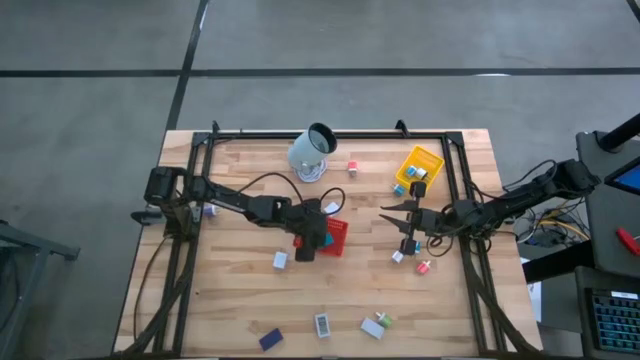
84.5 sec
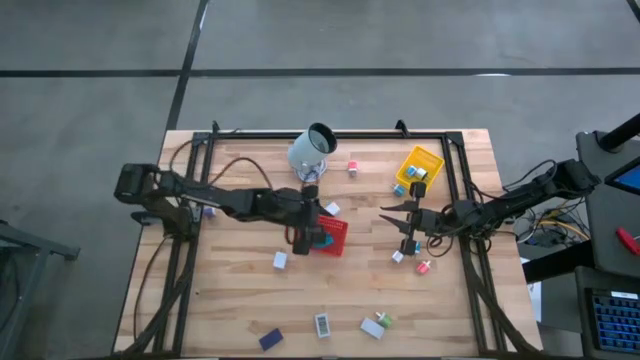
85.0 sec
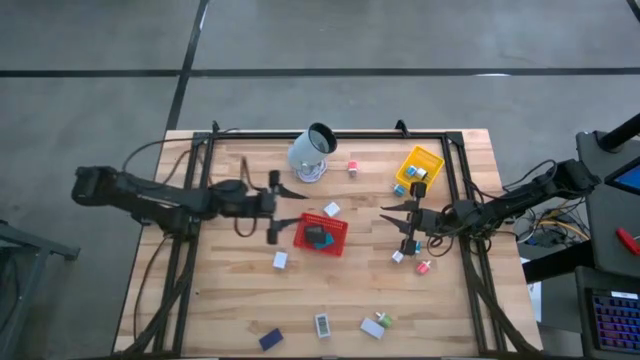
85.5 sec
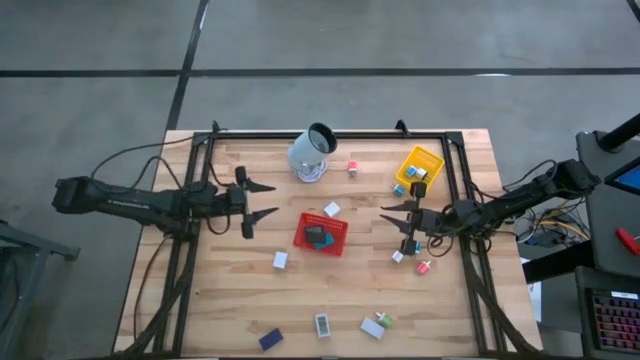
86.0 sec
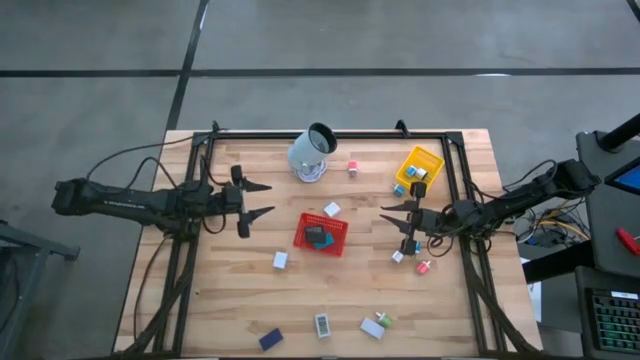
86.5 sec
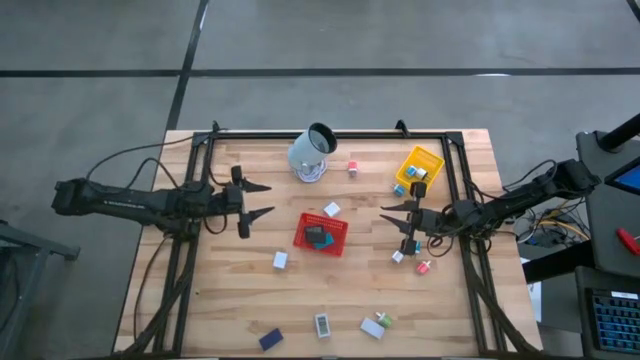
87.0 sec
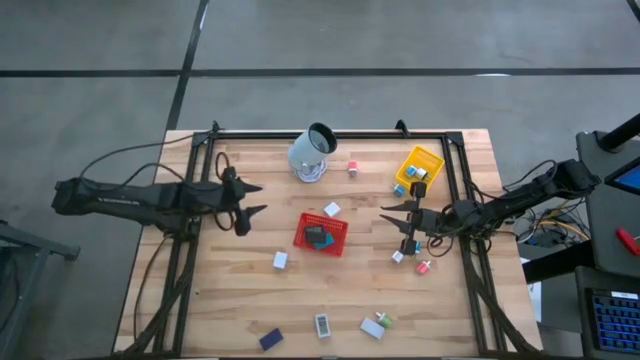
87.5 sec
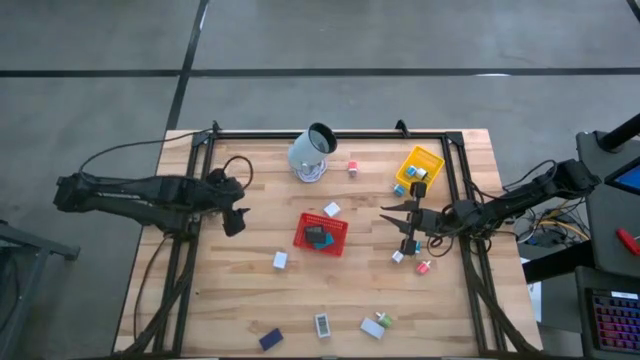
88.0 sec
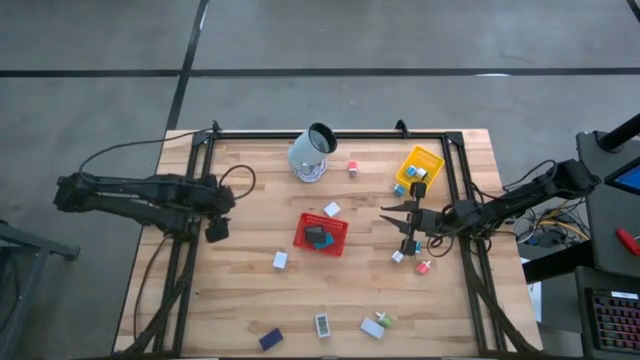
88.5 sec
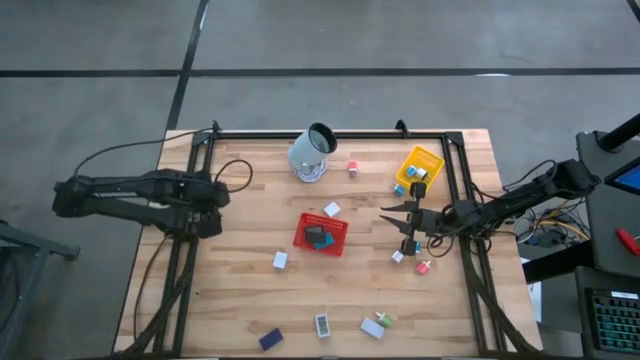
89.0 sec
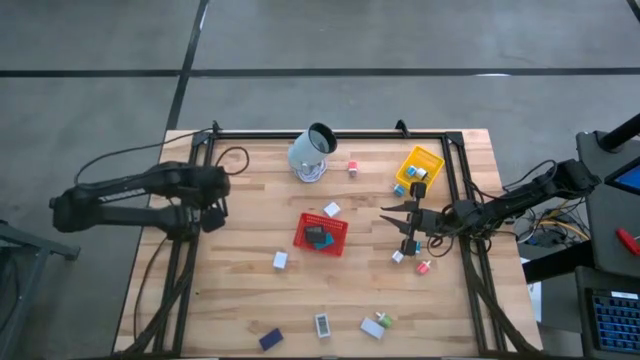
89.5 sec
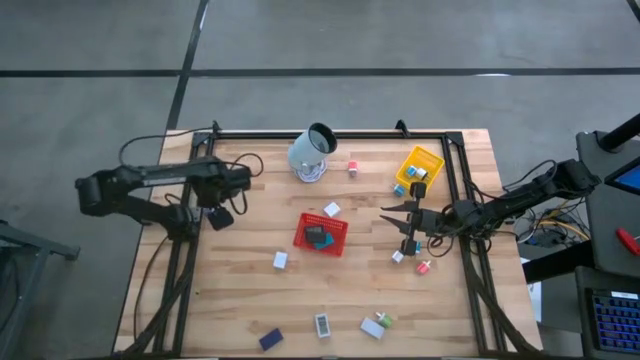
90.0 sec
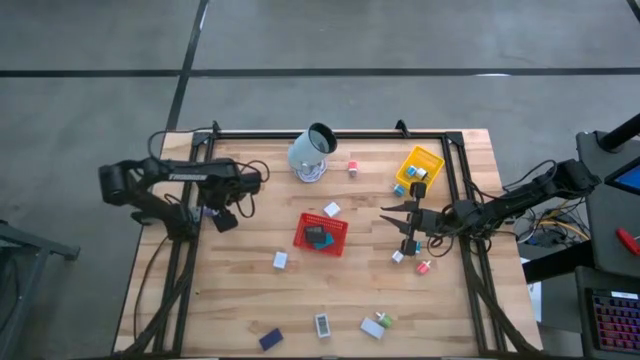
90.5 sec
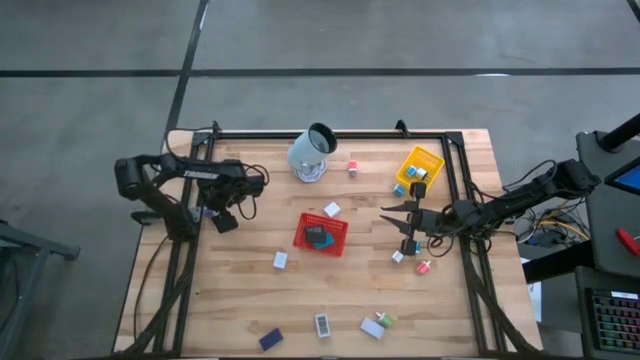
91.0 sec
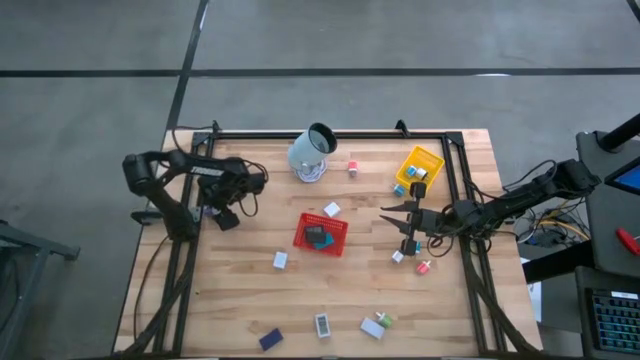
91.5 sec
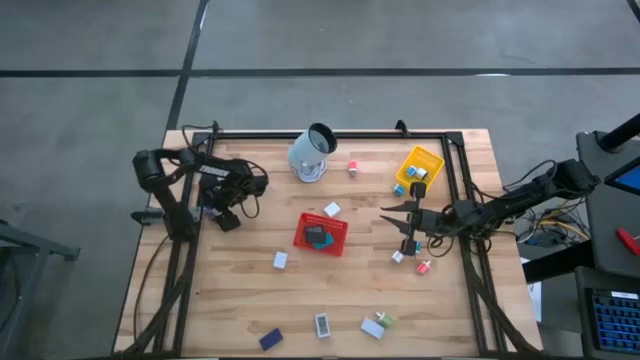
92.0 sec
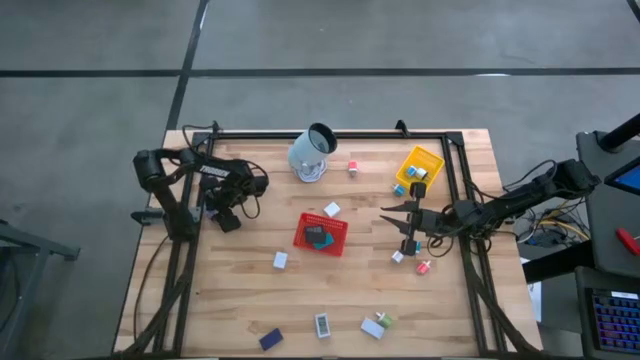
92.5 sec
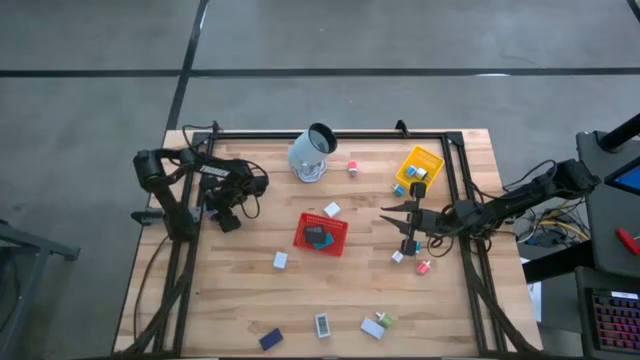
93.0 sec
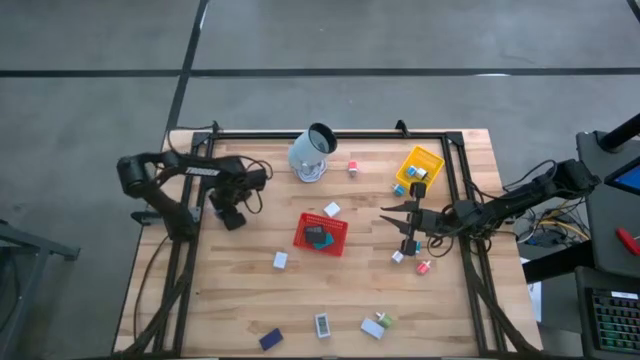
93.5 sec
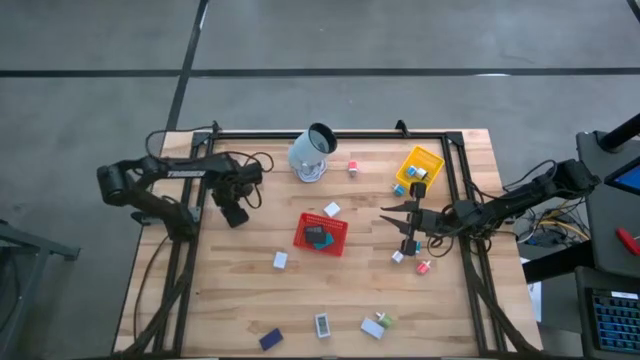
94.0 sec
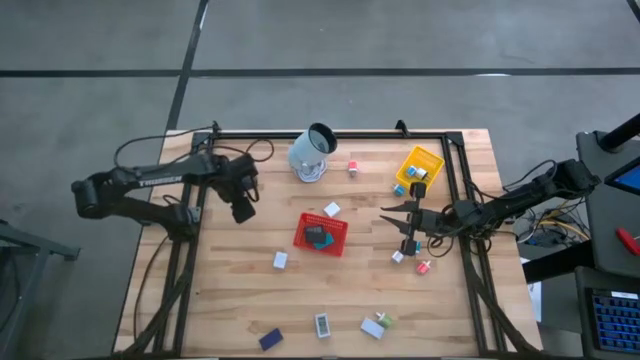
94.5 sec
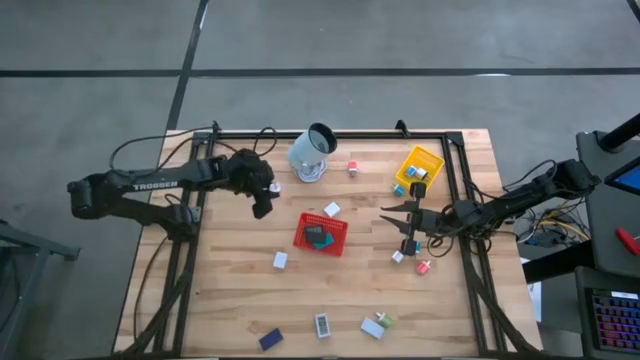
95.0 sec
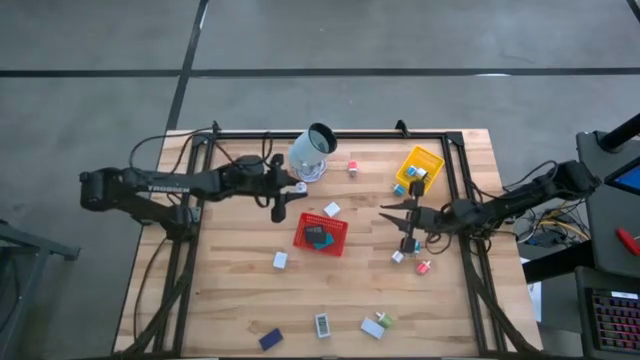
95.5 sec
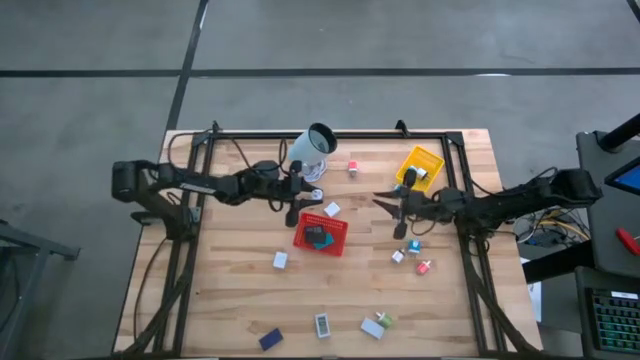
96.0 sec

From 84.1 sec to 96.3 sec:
Task: Pick & Place Office items
Put the violet charger adapter into the yellow basket

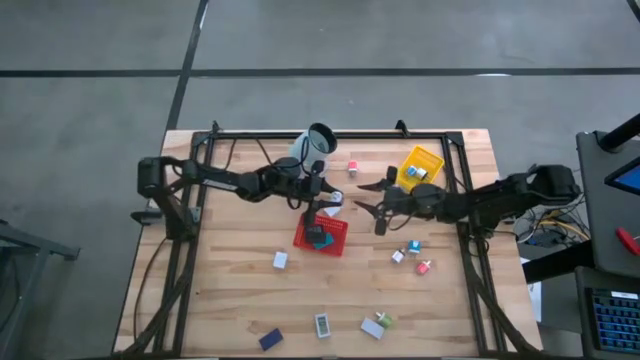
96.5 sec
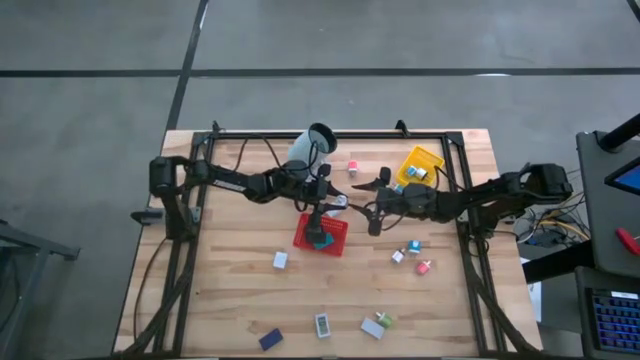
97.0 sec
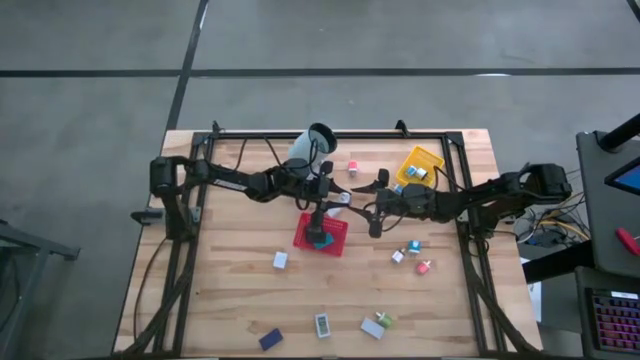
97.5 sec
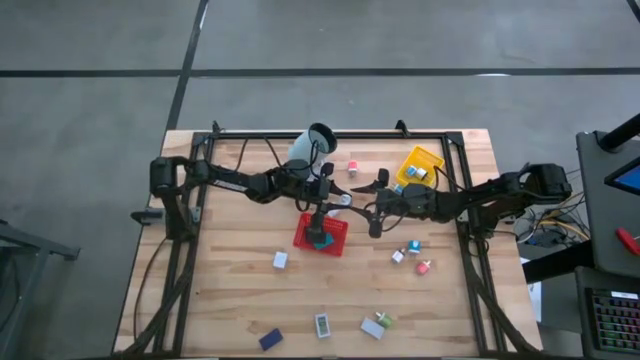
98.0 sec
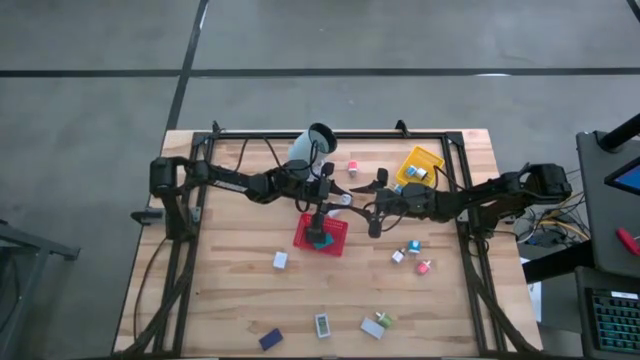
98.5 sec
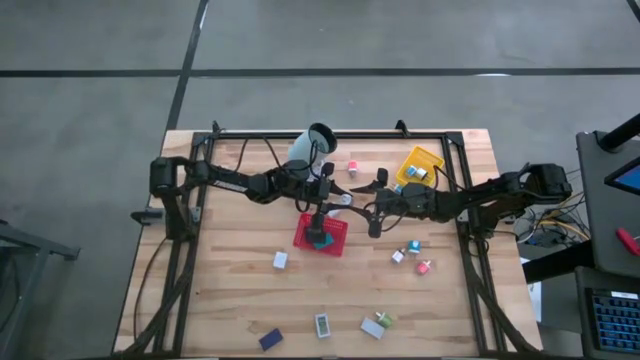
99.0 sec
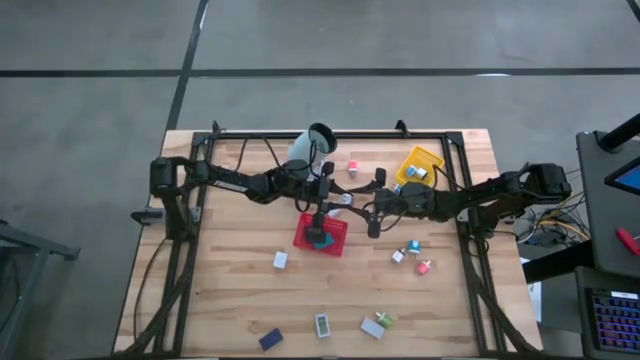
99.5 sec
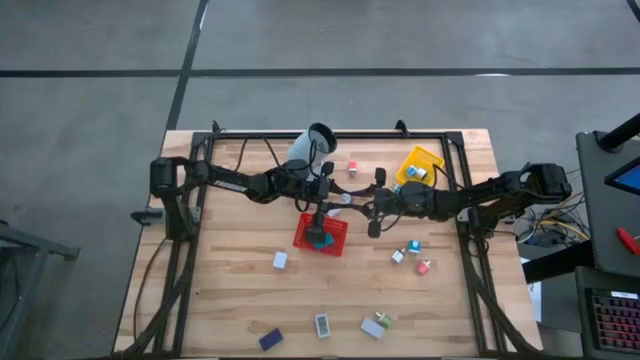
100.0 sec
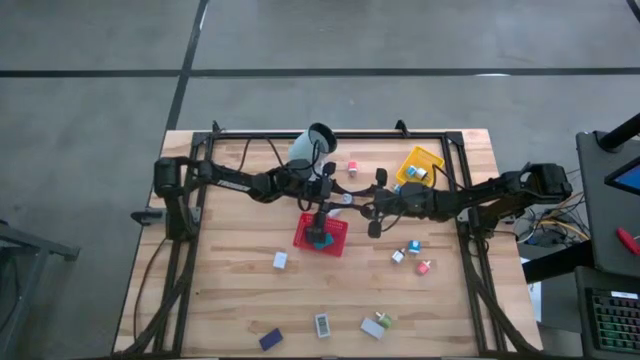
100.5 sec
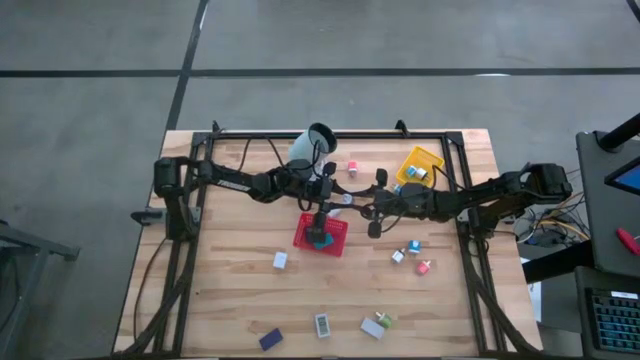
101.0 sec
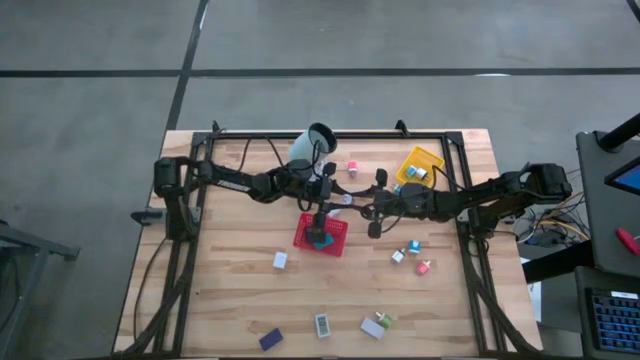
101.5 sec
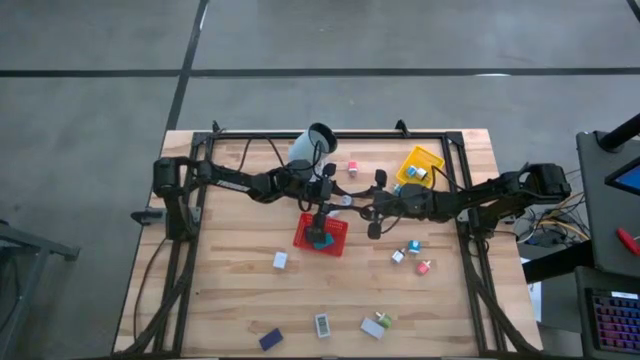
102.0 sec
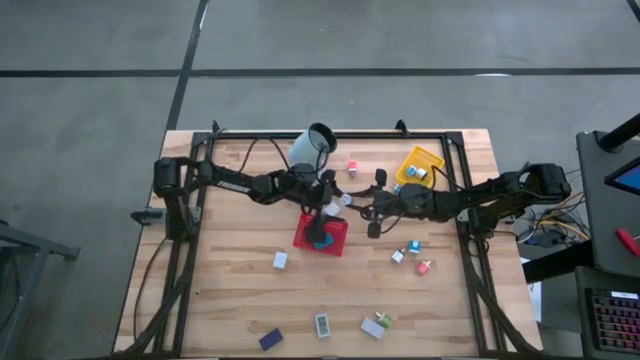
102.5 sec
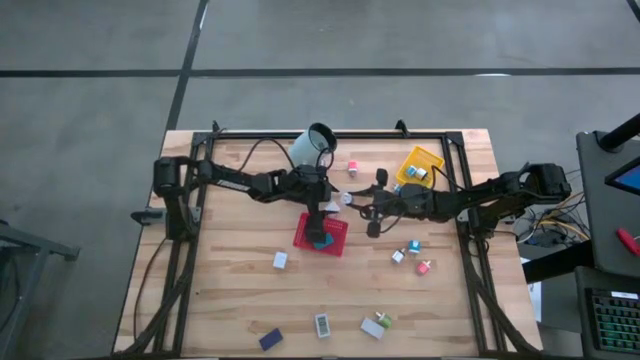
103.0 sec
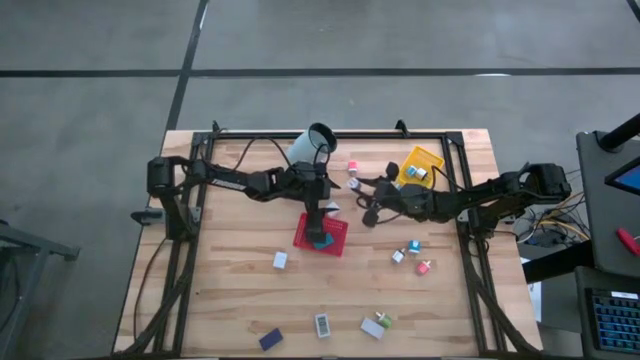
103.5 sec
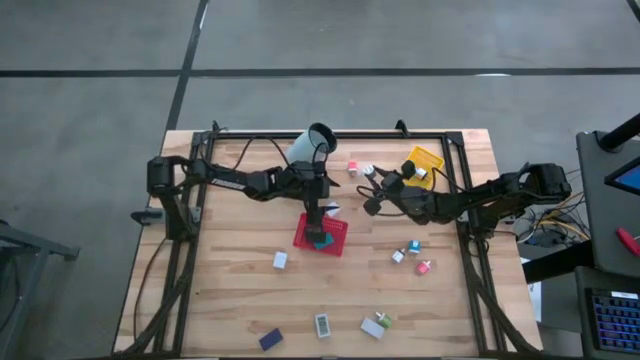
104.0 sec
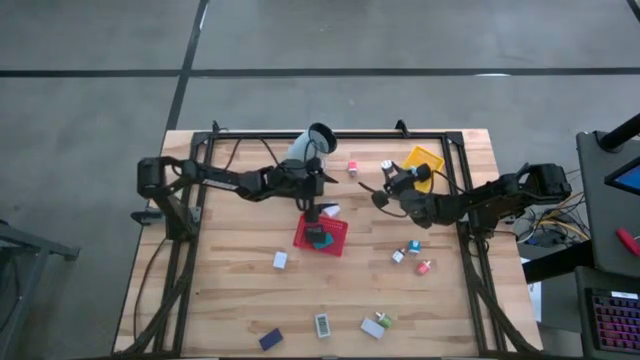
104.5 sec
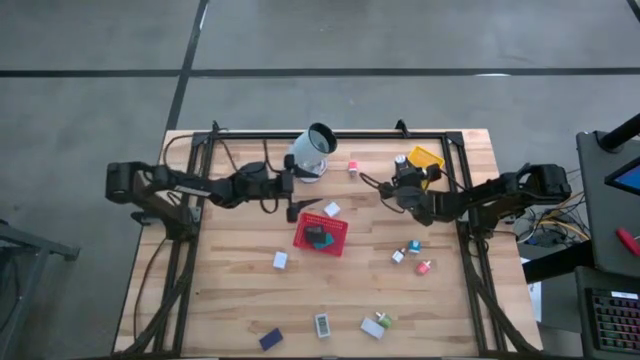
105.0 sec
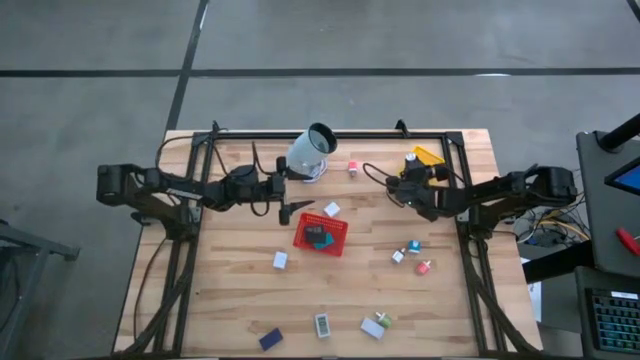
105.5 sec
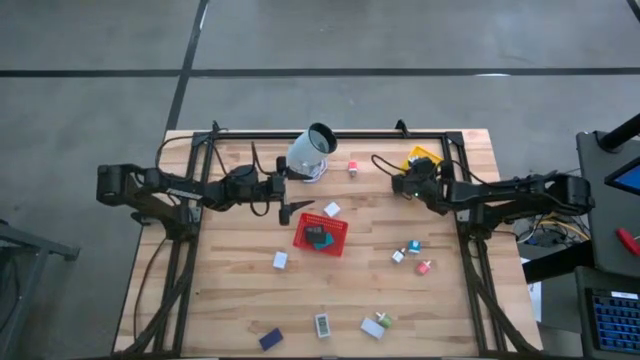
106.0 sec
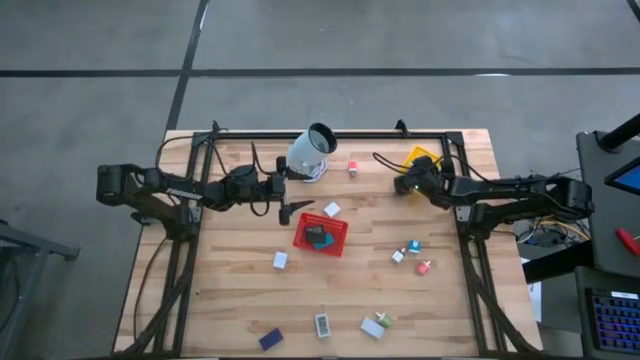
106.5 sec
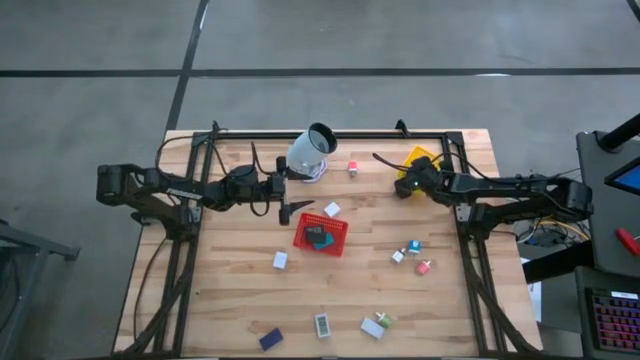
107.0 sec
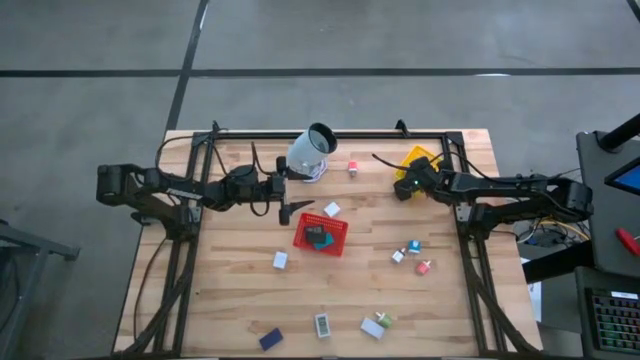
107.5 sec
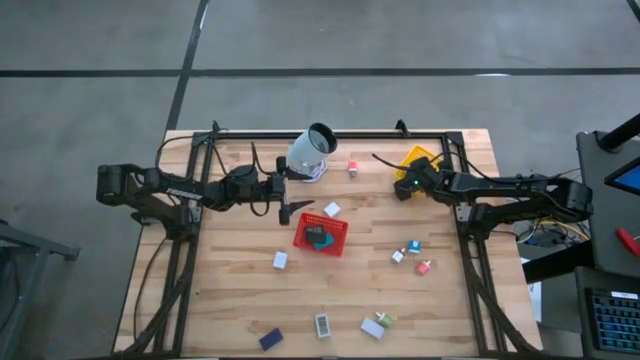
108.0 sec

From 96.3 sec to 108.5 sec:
Put the violet charger adapter into the yellow basket
